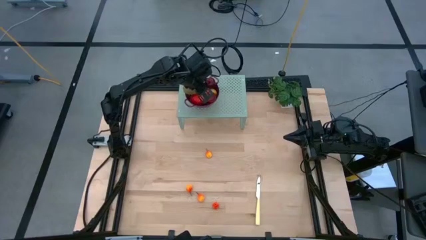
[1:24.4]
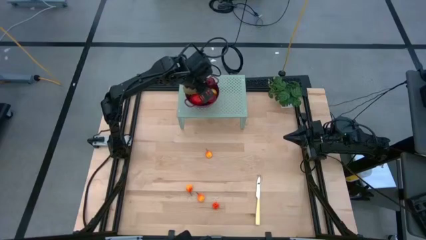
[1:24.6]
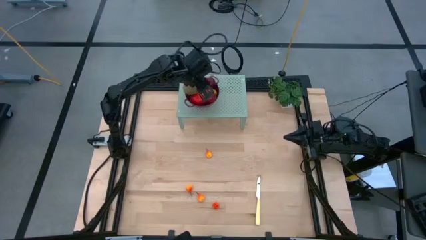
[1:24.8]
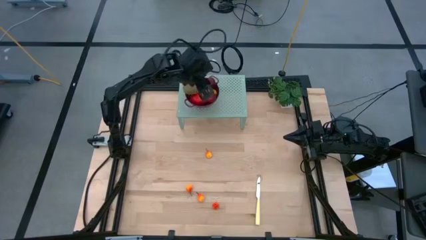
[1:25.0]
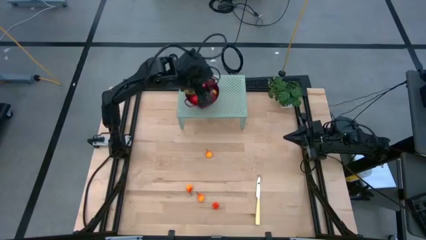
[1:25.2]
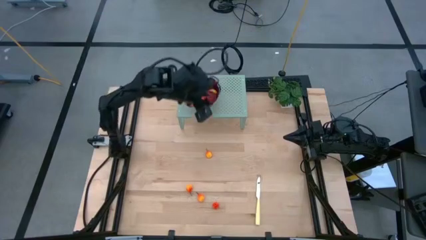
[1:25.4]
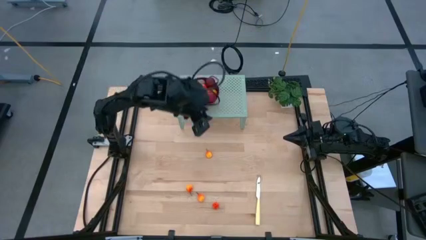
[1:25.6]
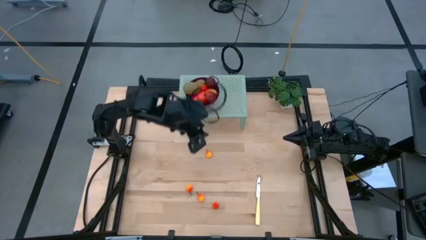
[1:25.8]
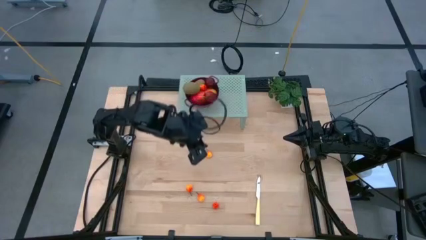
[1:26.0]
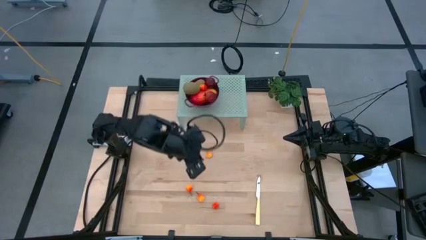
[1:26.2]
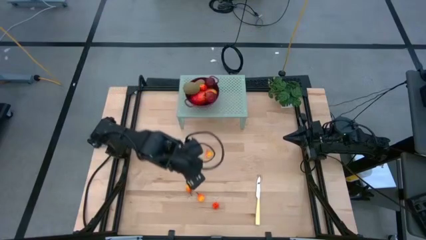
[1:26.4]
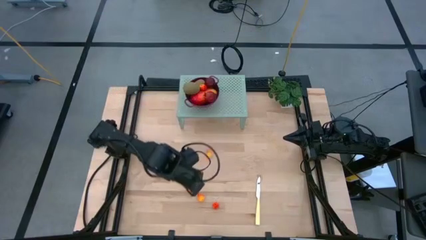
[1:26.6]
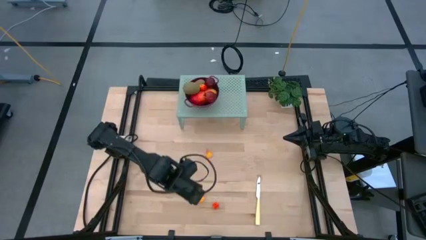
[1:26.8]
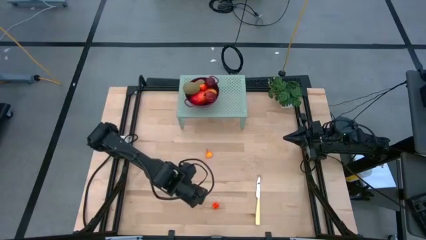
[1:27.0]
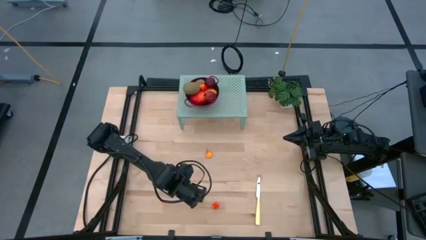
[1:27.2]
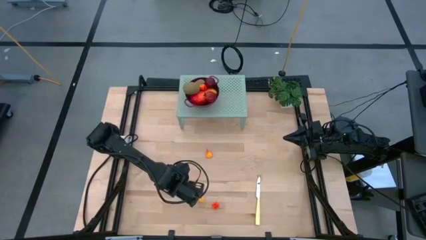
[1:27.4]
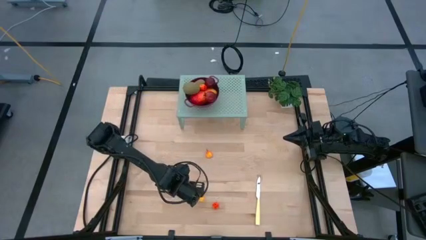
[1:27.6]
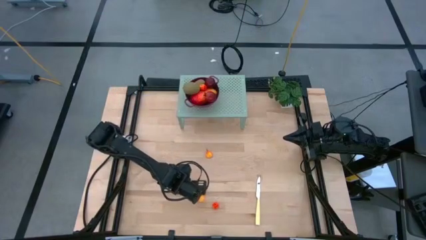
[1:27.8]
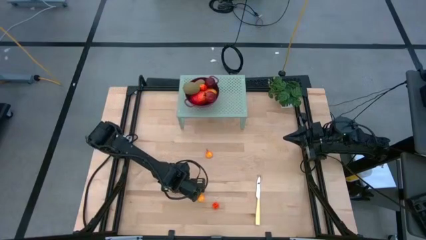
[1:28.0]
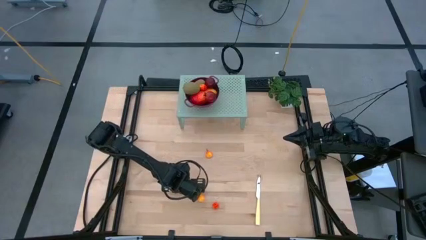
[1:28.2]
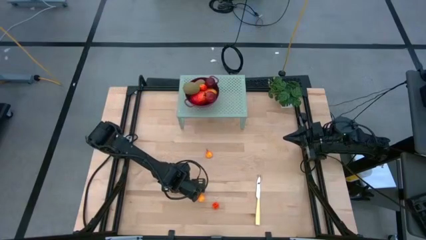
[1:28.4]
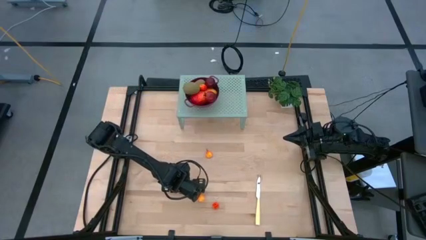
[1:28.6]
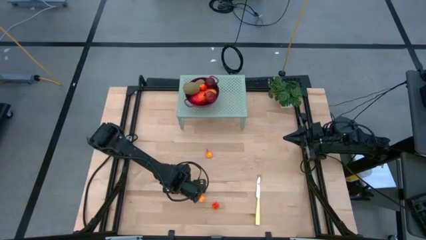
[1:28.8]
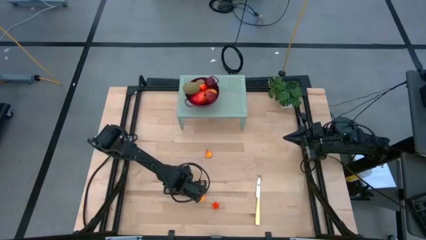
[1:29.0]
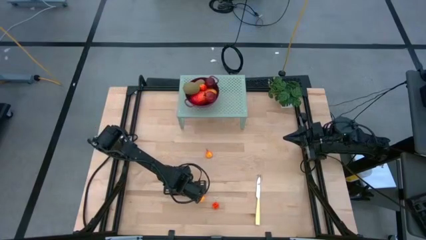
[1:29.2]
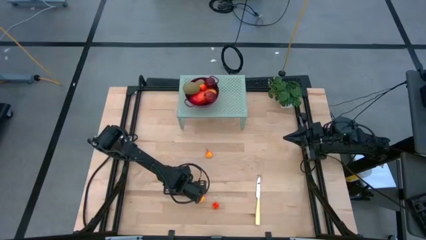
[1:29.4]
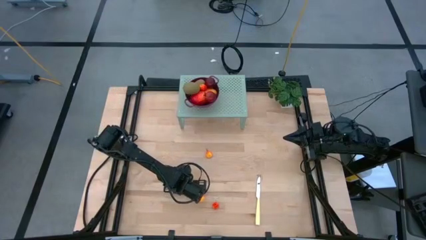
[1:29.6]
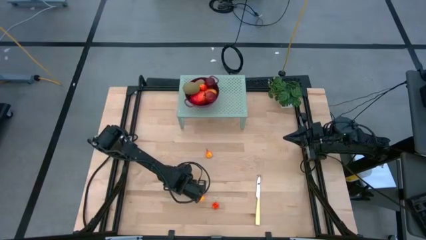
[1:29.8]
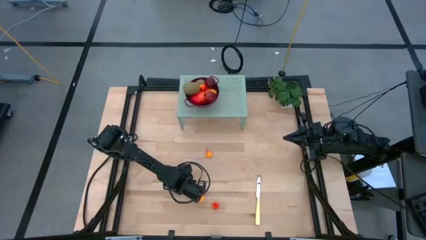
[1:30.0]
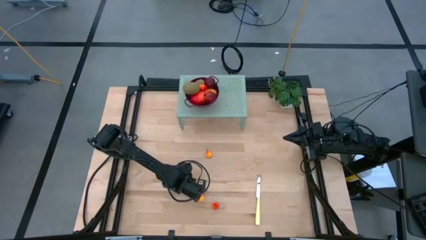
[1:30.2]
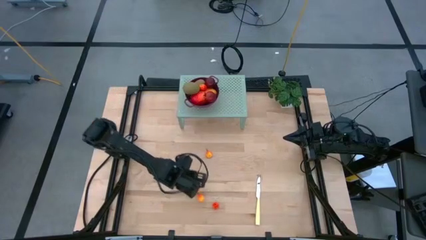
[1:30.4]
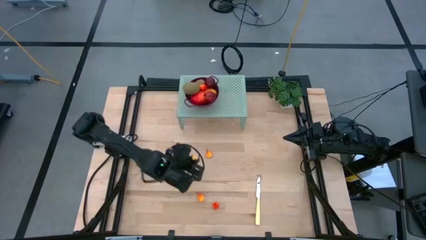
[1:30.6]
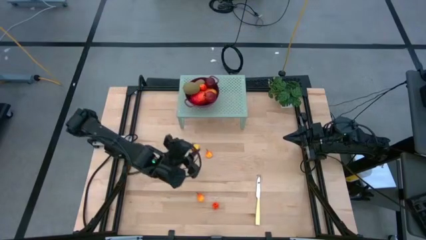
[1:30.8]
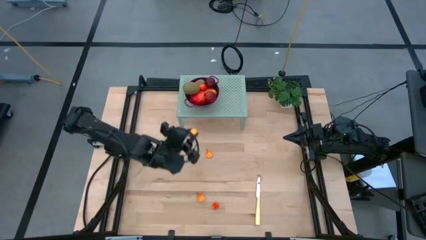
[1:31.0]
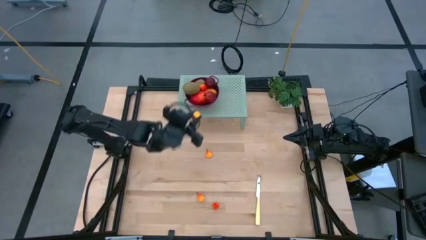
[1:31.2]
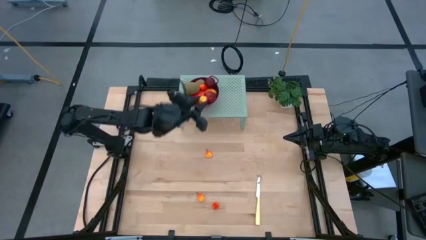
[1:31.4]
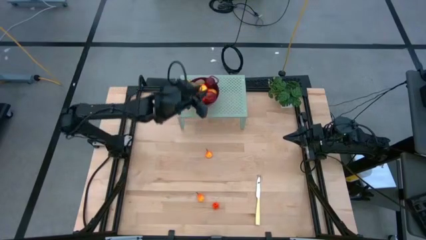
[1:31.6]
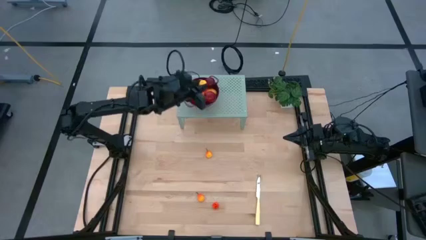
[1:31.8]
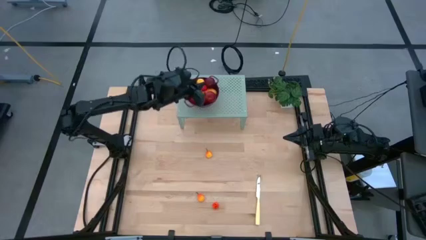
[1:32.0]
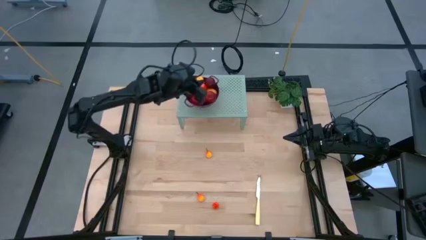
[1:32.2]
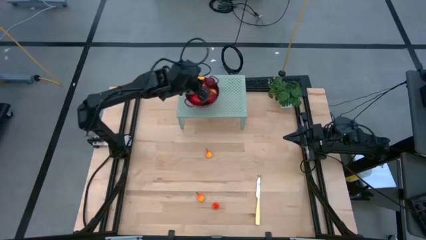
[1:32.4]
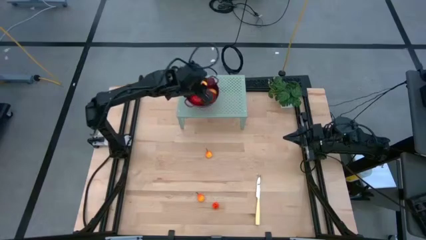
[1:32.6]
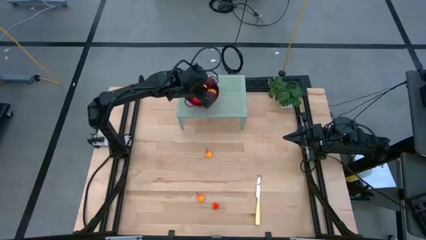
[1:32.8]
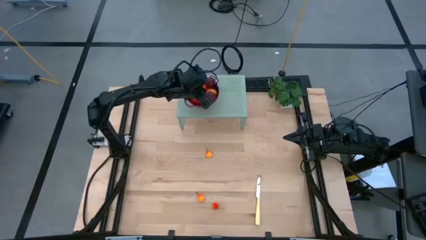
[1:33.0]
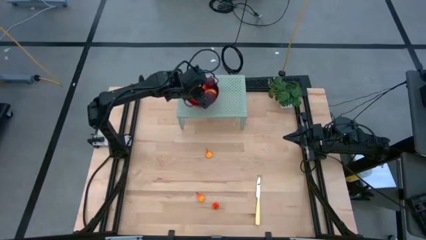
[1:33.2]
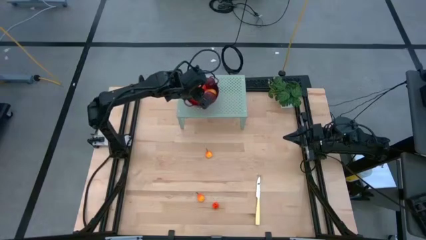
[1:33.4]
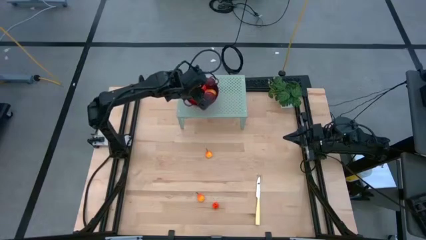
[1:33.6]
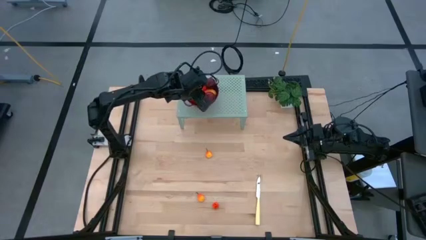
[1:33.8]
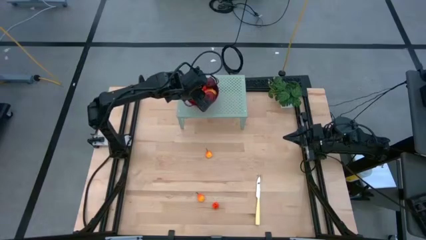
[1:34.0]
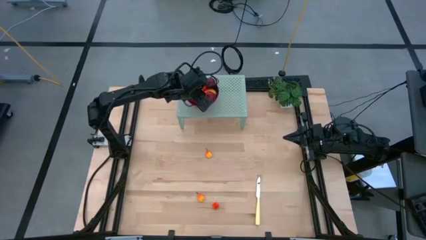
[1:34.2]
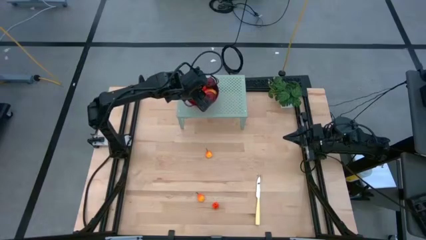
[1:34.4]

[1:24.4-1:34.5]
Task: Pick & Place Fruit
Put the orange peach in the red strainer bowl on the shelf

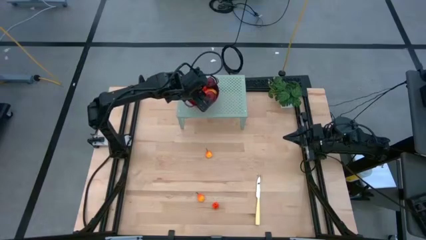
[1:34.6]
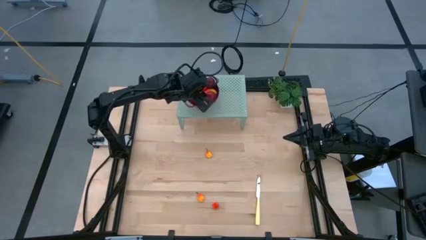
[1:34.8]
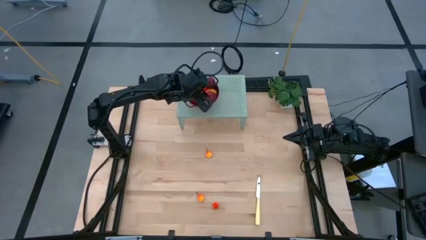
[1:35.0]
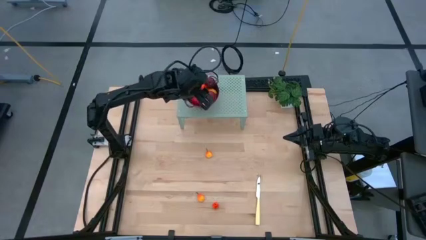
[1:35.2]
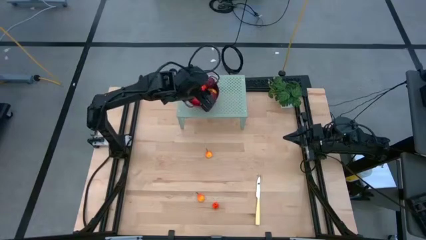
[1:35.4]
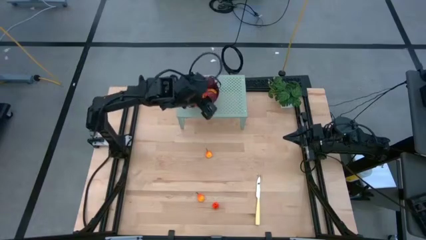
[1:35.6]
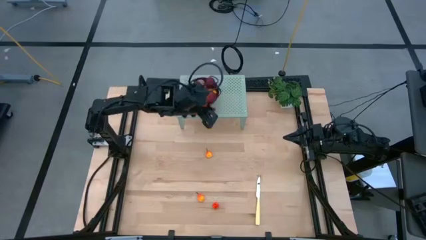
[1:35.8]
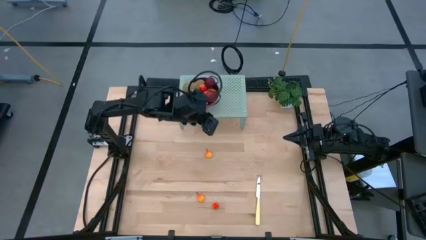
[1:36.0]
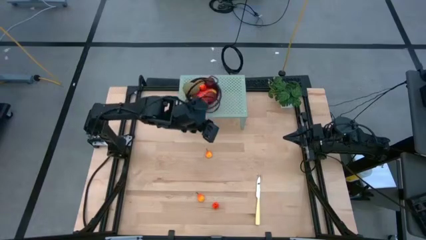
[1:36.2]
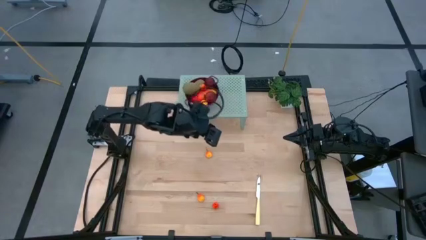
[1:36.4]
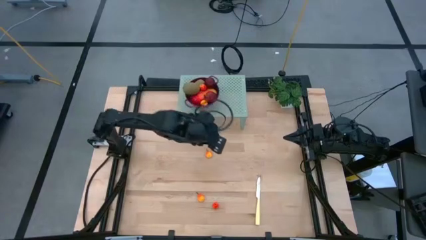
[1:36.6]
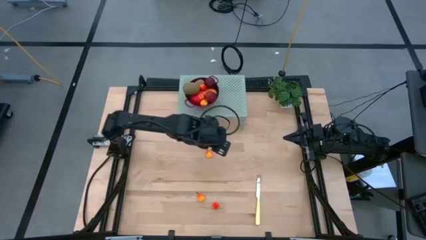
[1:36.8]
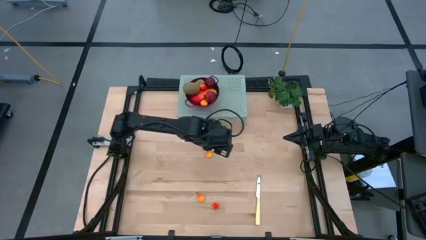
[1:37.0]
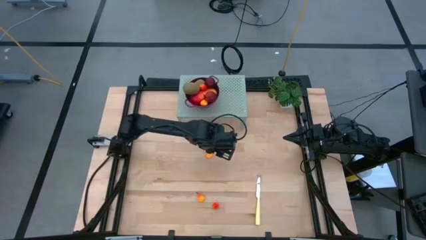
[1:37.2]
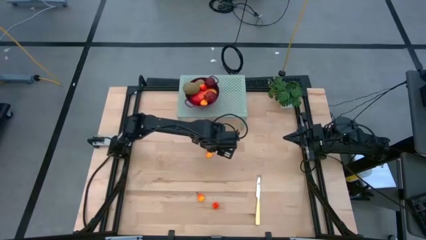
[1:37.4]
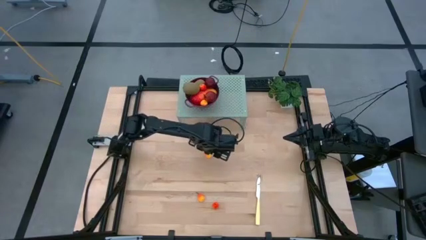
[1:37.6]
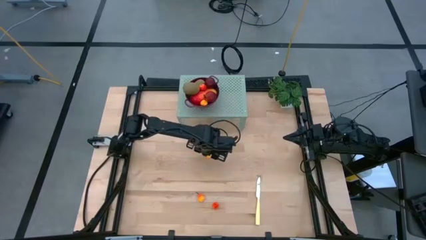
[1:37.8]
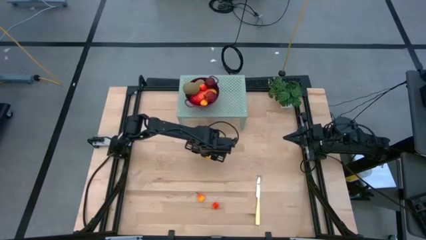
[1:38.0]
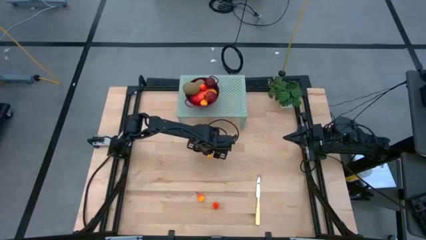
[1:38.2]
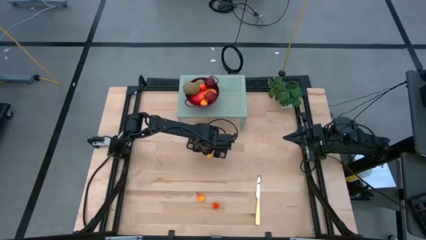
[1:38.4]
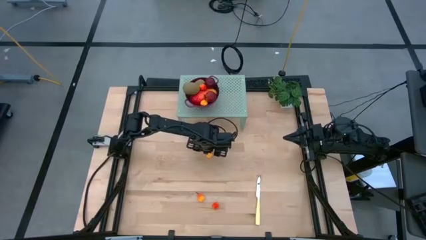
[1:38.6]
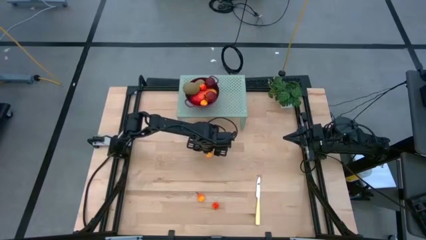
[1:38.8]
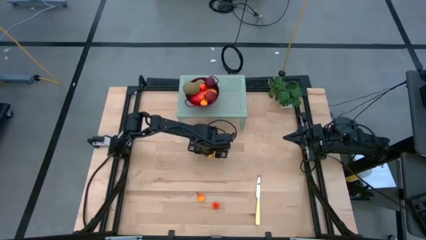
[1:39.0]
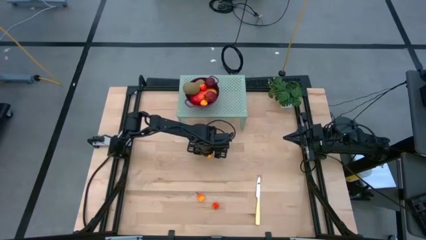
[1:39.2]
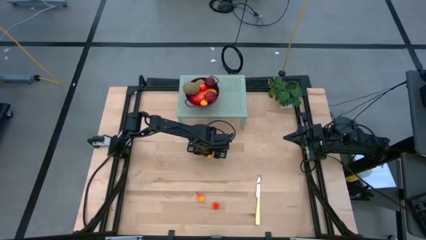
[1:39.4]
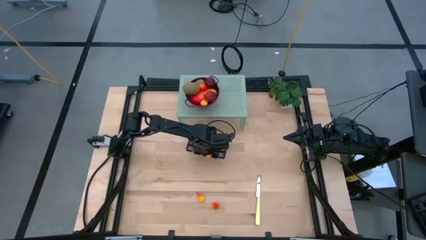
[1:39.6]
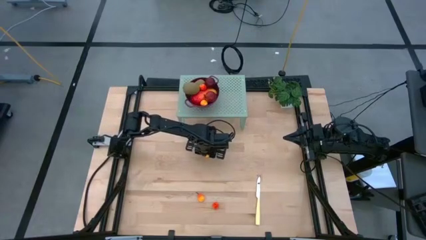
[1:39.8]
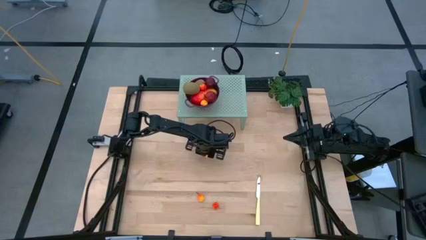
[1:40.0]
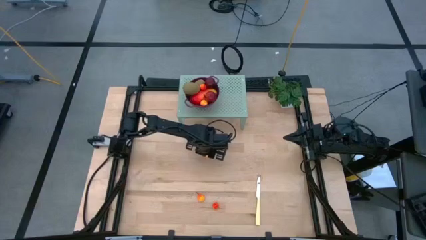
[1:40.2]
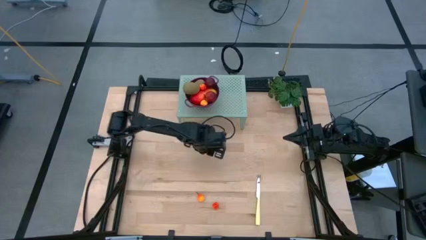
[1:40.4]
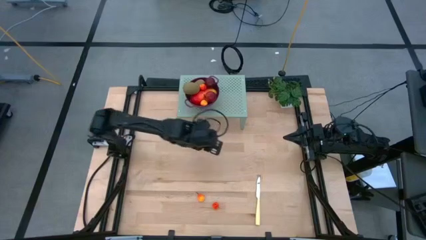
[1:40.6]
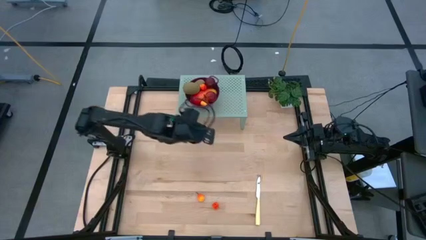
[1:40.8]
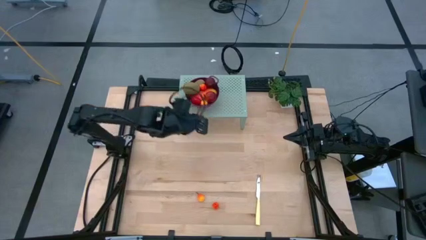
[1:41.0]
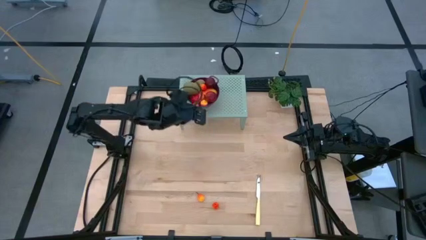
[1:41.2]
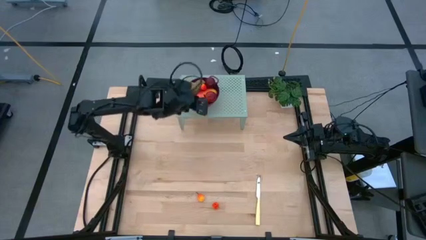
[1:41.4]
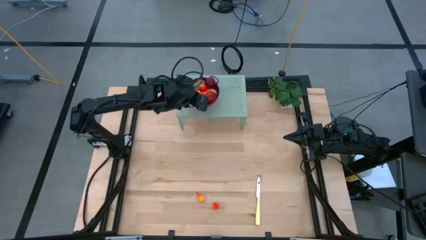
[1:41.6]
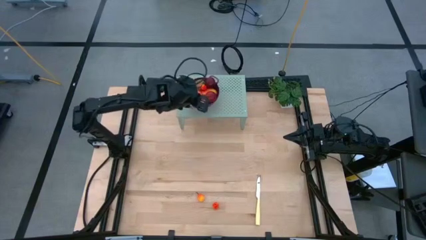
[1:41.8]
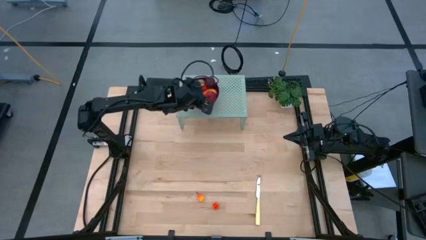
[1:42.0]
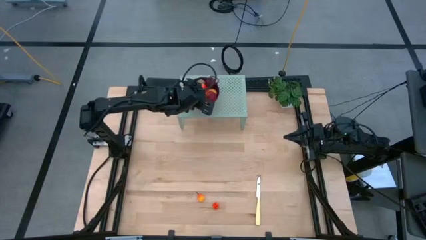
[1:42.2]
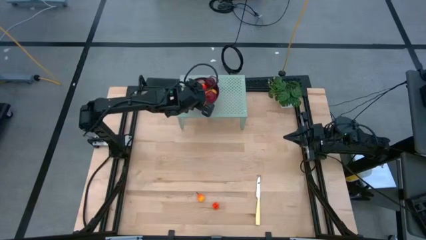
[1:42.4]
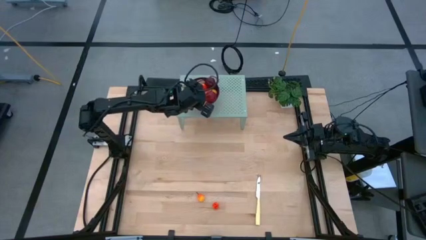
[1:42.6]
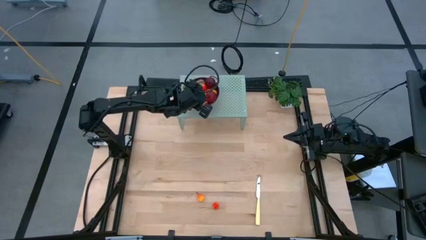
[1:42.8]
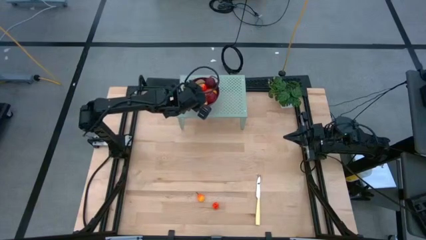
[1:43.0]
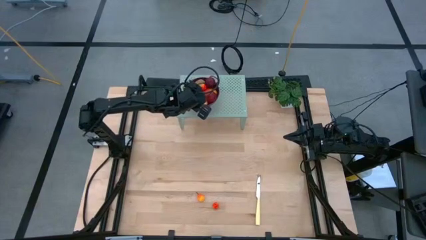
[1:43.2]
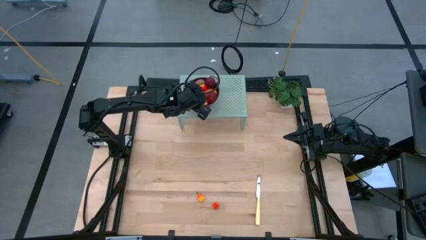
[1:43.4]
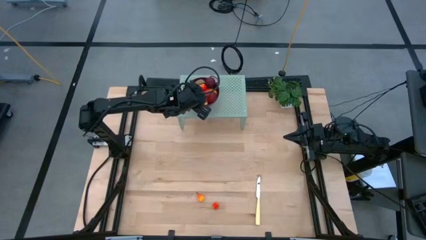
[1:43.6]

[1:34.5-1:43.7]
Put the orange peach in the red strainer bowl on the shelf
